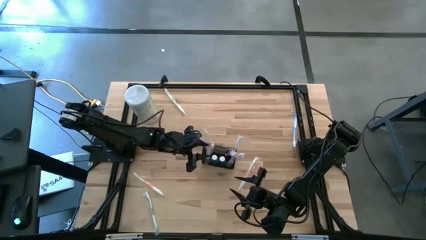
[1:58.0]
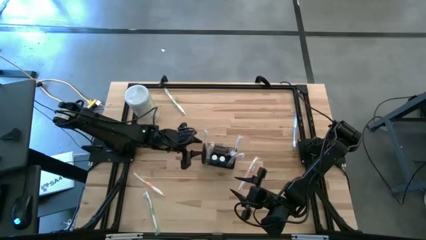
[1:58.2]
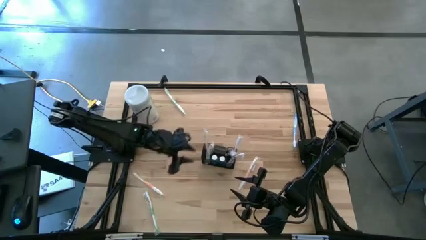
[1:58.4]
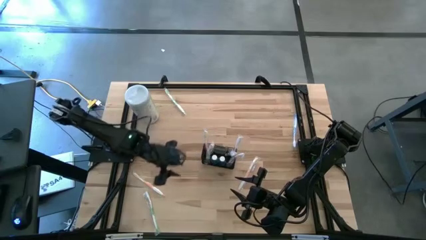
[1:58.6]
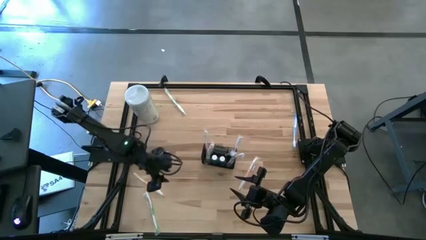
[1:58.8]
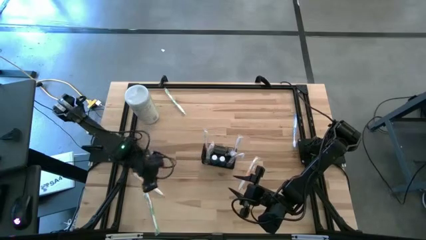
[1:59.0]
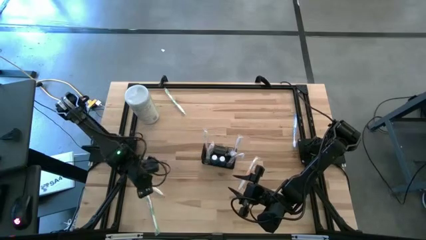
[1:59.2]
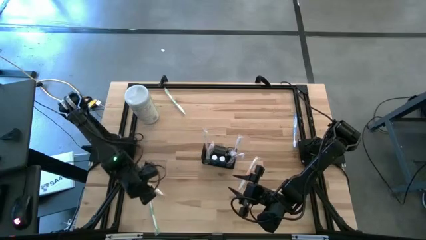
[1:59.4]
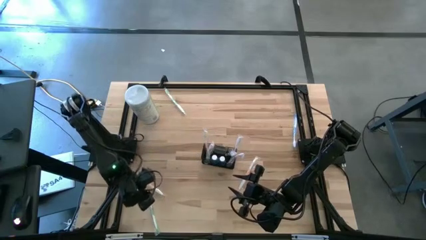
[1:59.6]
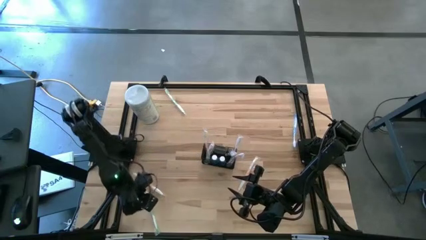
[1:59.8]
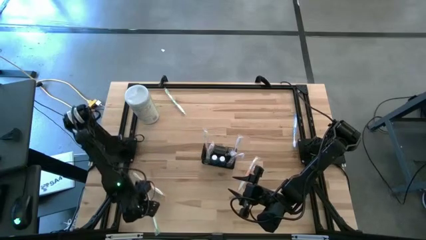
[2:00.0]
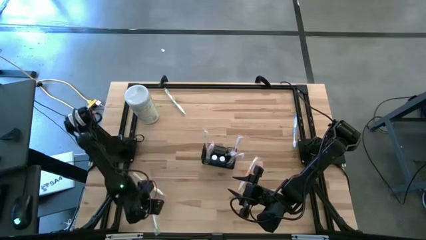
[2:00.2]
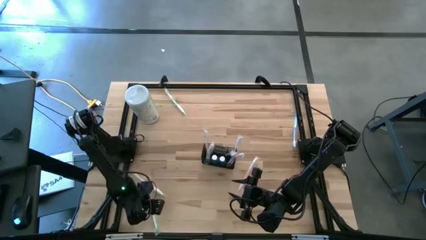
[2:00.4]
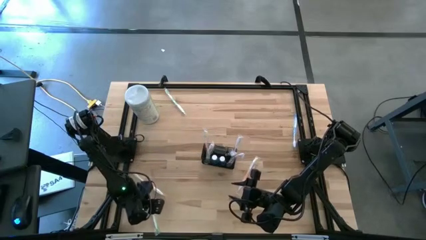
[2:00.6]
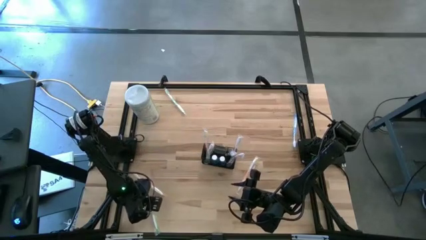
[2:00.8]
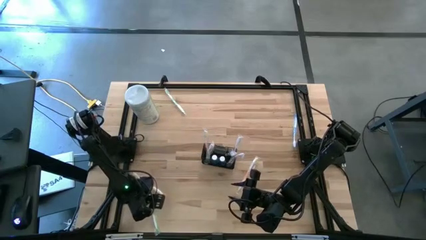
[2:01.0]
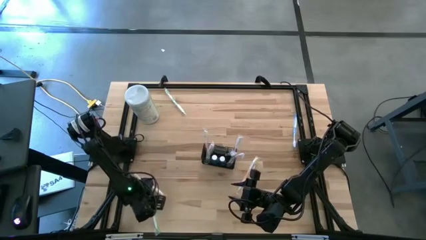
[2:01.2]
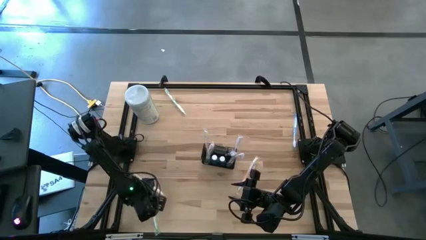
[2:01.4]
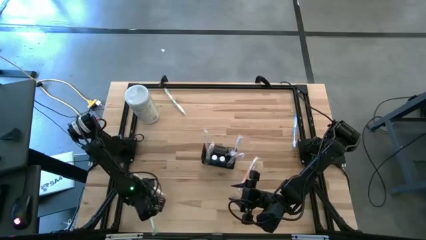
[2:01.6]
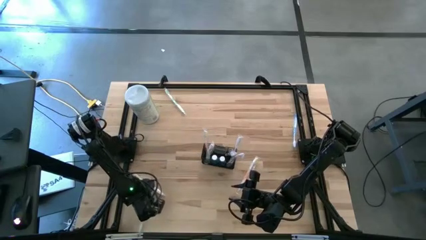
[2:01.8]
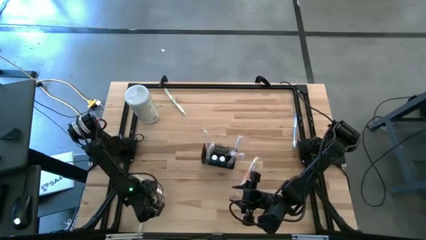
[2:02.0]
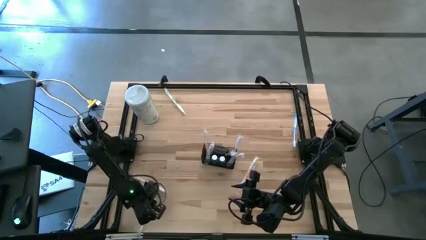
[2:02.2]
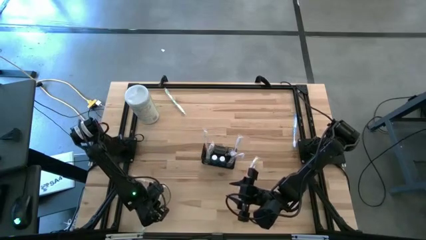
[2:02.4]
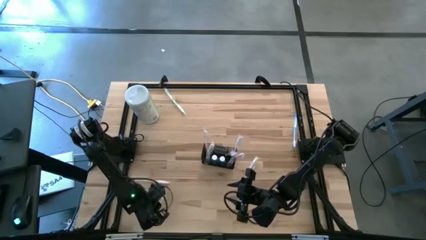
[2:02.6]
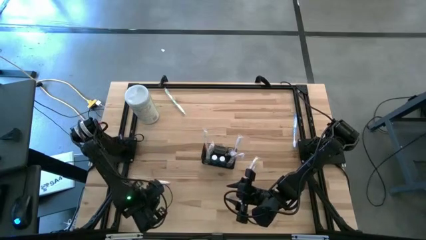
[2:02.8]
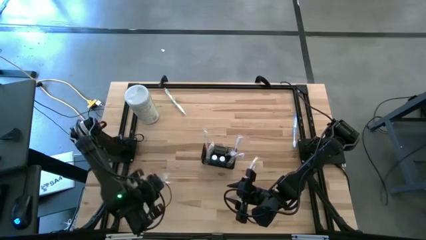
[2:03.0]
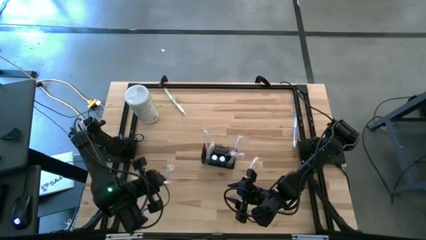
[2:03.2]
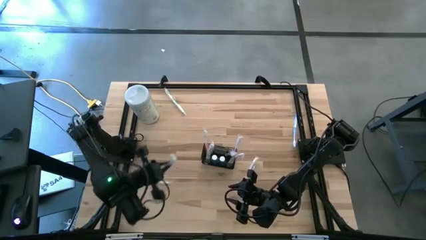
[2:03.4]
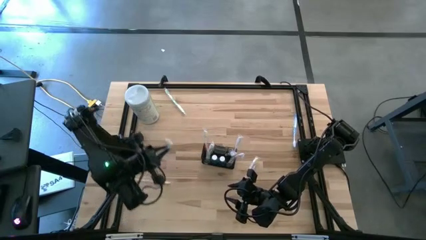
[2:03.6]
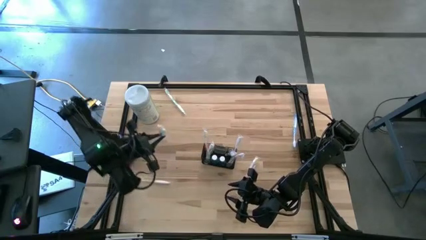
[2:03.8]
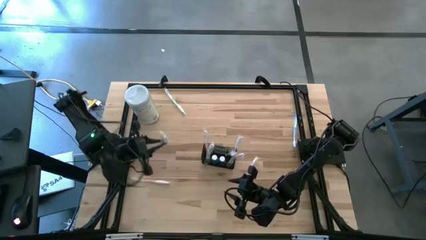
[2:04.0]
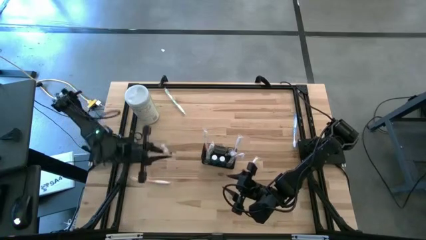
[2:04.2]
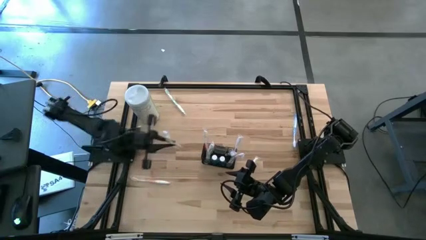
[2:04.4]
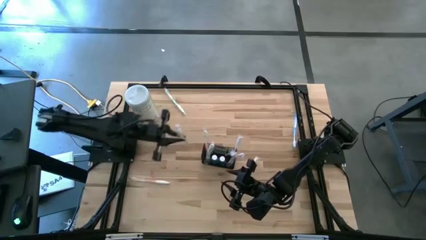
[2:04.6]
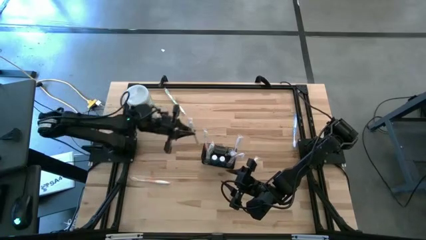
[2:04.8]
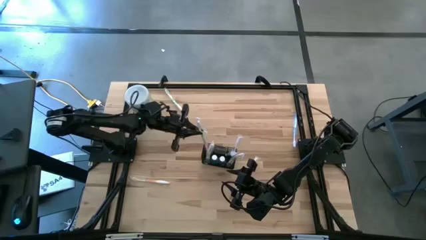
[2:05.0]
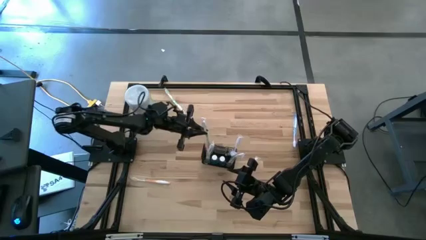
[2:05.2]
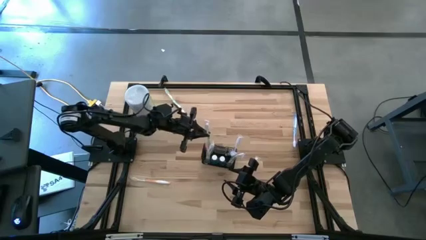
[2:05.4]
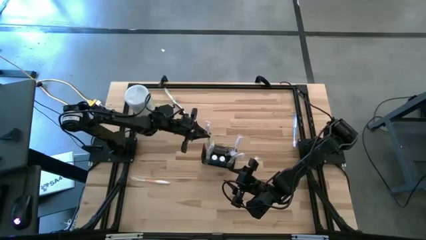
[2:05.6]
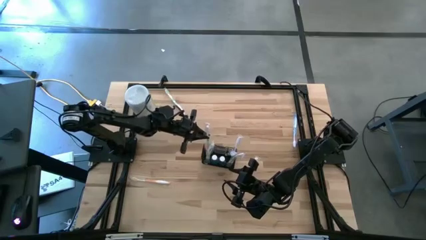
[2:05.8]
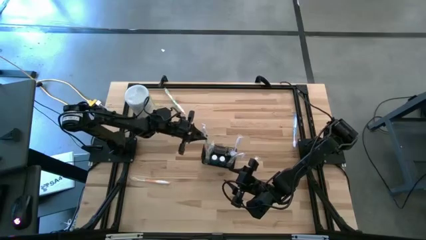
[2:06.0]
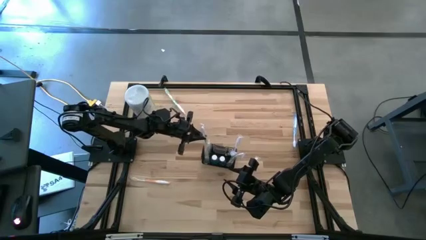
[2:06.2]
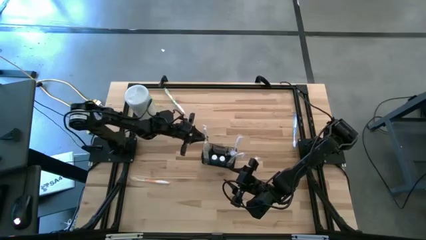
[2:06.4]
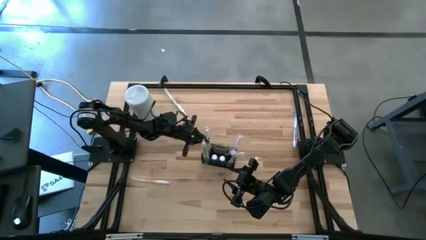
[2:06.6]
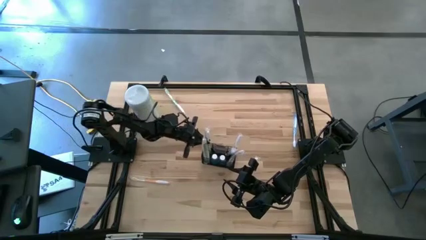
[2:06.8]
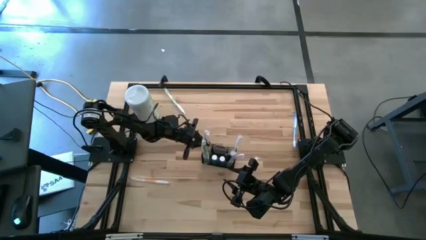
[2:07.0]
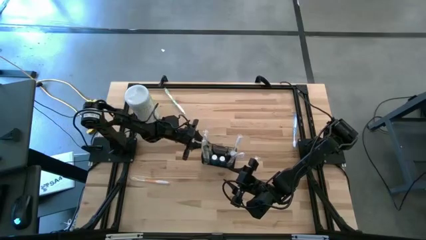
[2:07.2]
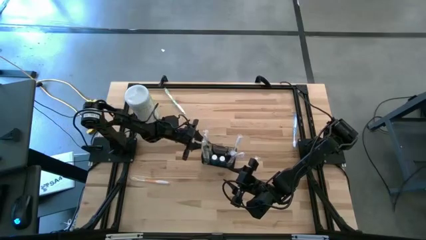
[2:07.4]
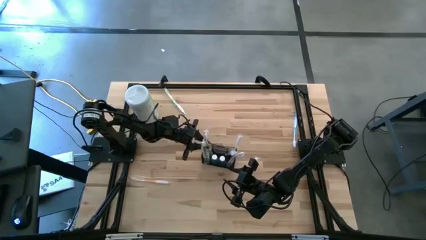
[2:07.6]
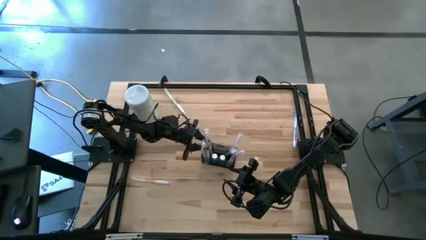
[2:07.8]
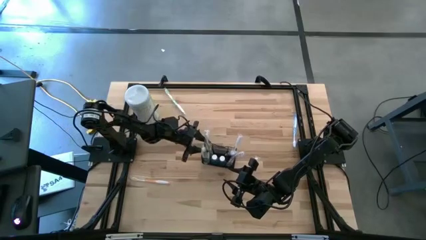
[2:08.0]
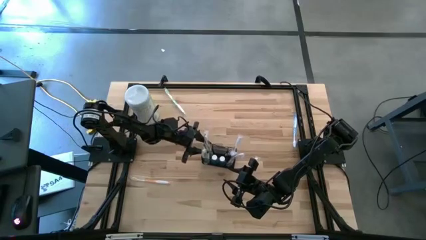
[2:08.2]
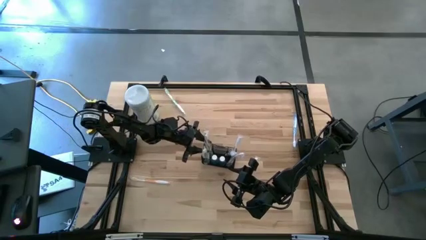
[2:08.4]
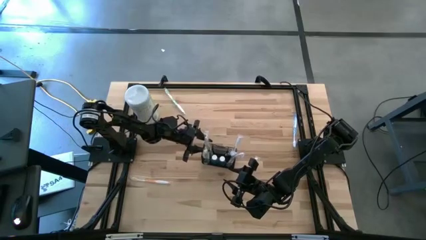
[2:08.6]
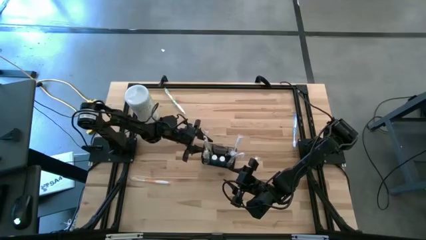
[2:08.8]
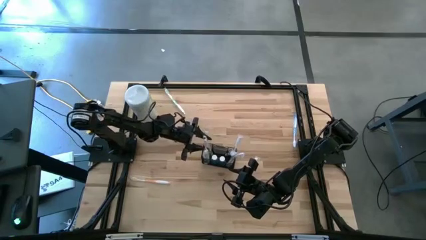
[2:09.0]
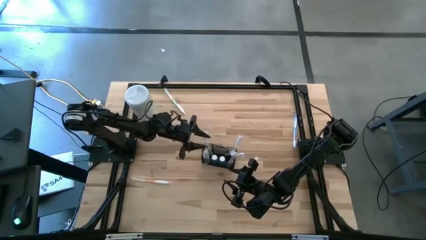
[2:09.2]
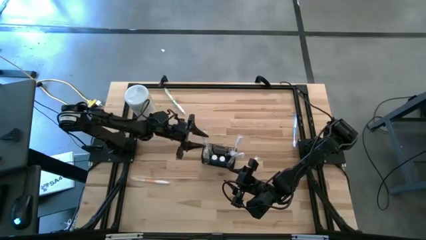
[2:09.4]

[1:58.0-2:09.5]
Task: Pick & Place toothbrushing station
Put the bottom green toothbrush into the mesh organizer
